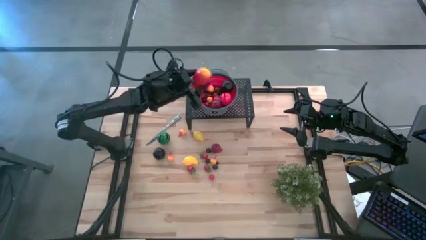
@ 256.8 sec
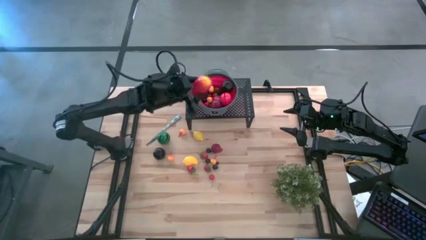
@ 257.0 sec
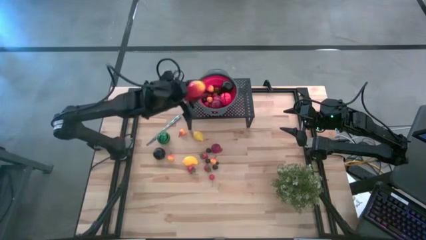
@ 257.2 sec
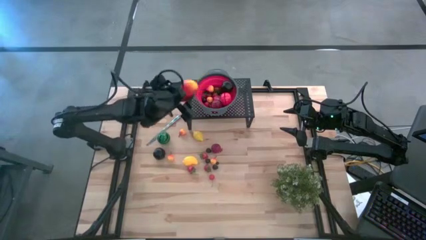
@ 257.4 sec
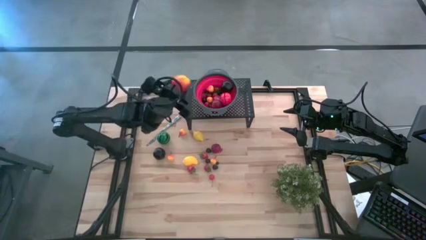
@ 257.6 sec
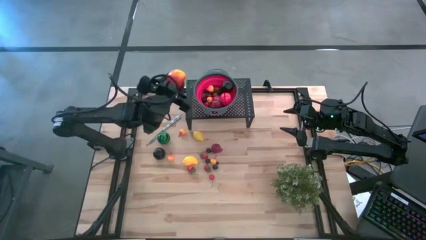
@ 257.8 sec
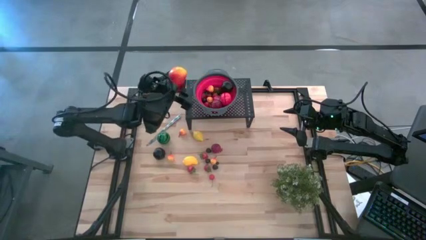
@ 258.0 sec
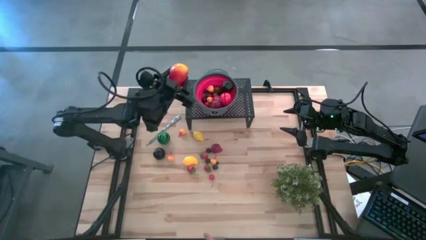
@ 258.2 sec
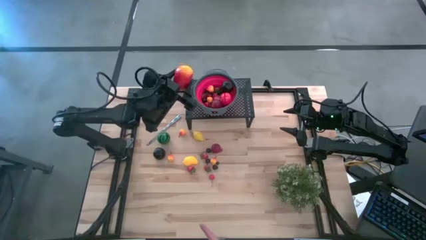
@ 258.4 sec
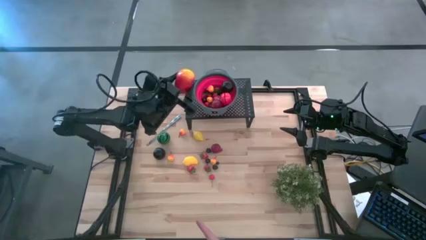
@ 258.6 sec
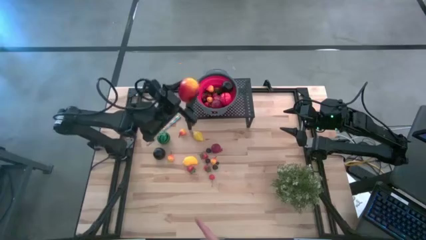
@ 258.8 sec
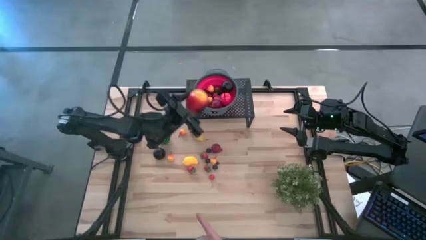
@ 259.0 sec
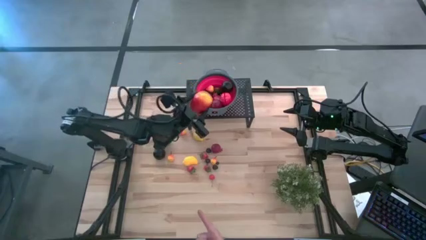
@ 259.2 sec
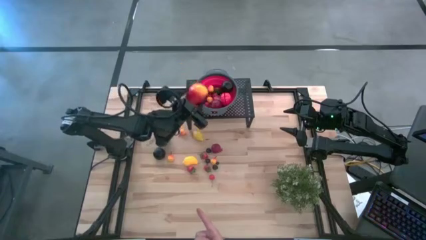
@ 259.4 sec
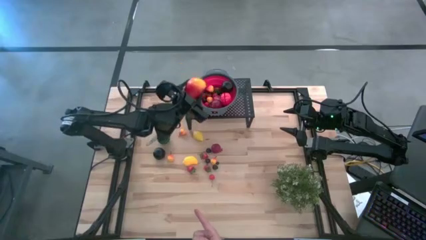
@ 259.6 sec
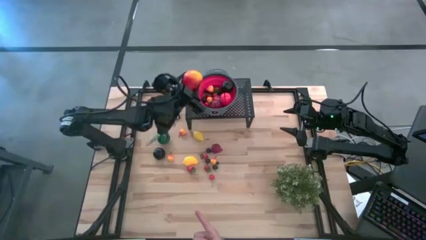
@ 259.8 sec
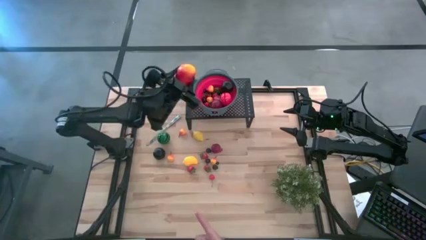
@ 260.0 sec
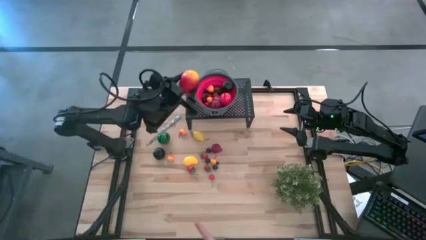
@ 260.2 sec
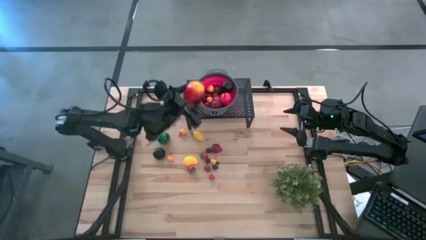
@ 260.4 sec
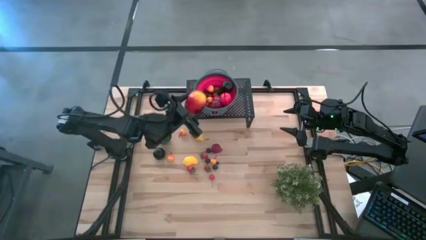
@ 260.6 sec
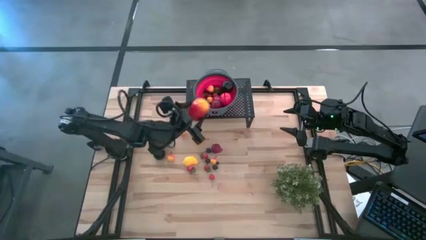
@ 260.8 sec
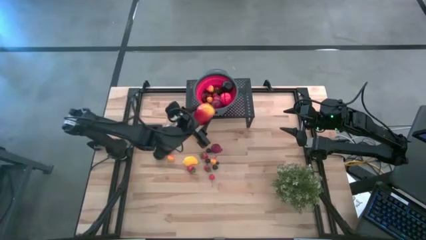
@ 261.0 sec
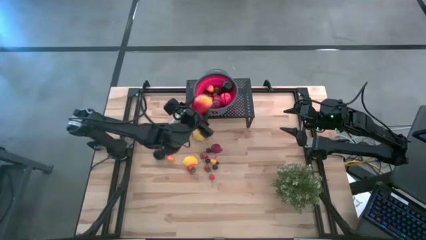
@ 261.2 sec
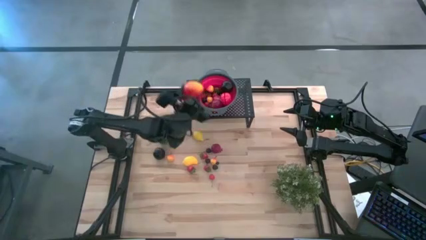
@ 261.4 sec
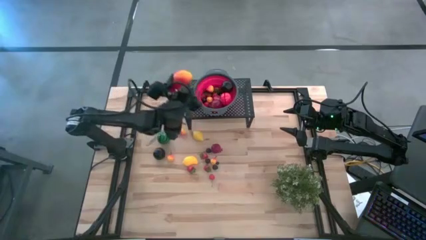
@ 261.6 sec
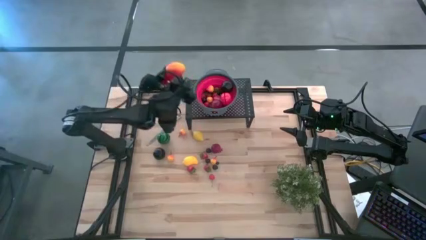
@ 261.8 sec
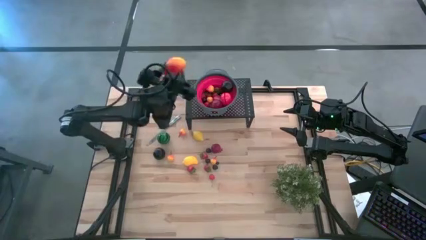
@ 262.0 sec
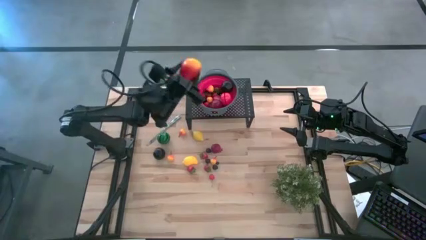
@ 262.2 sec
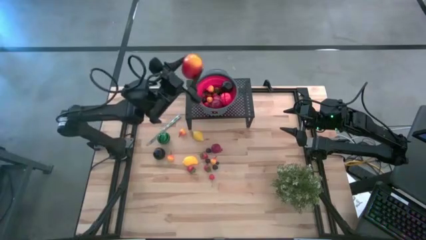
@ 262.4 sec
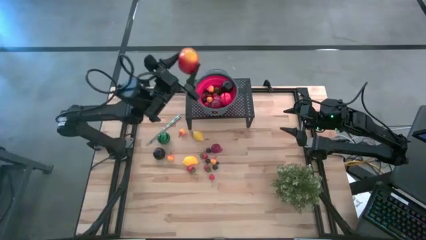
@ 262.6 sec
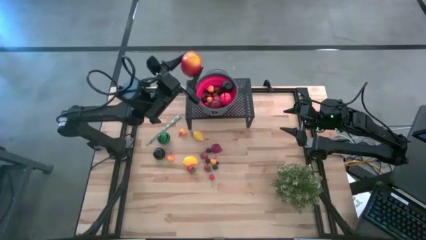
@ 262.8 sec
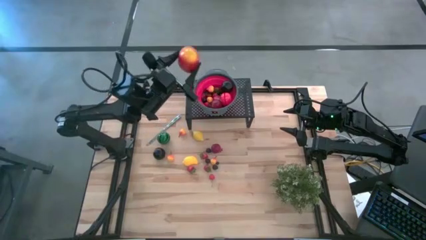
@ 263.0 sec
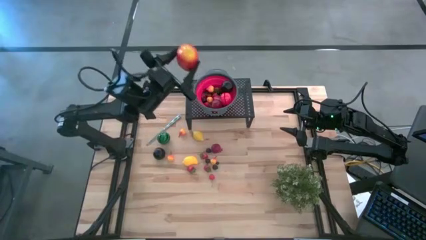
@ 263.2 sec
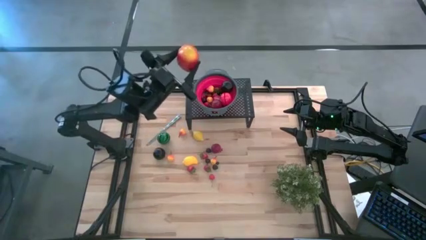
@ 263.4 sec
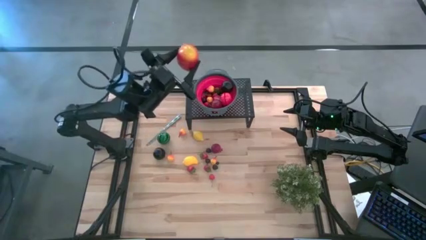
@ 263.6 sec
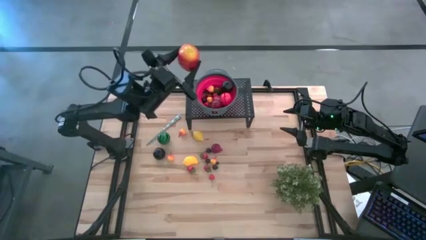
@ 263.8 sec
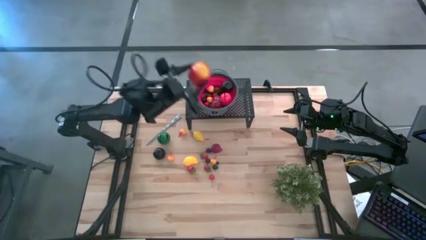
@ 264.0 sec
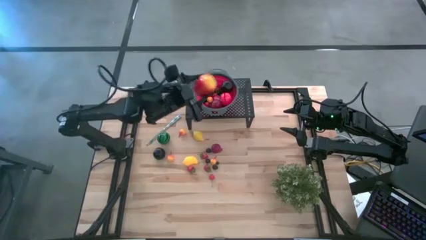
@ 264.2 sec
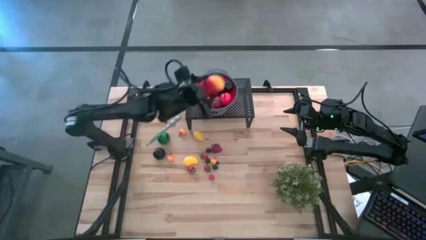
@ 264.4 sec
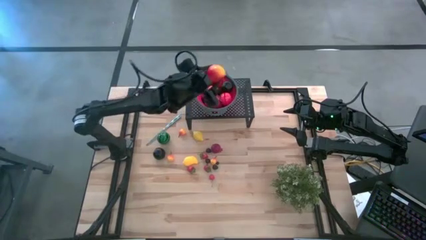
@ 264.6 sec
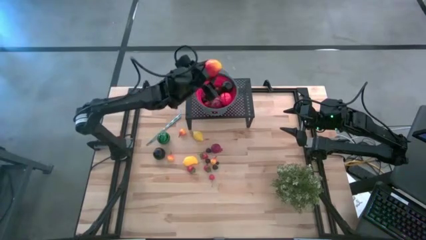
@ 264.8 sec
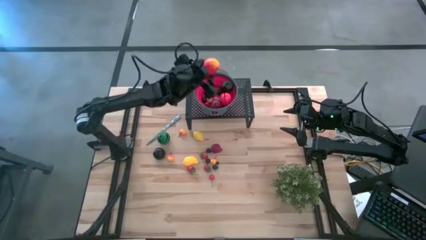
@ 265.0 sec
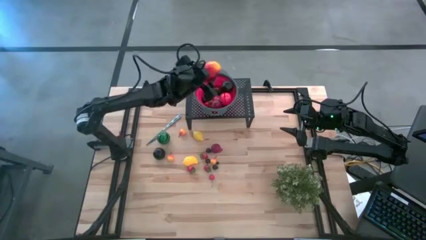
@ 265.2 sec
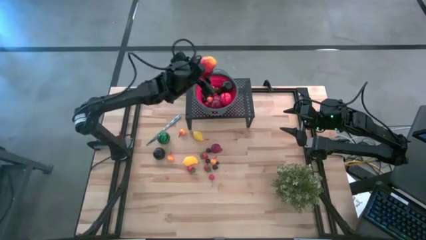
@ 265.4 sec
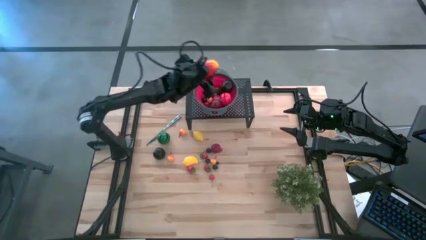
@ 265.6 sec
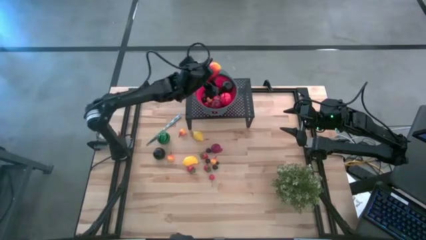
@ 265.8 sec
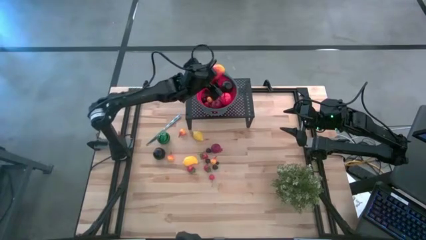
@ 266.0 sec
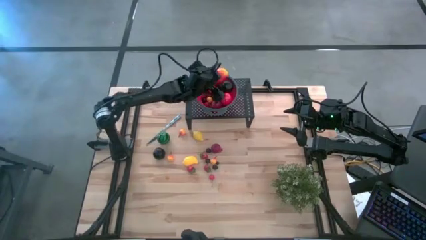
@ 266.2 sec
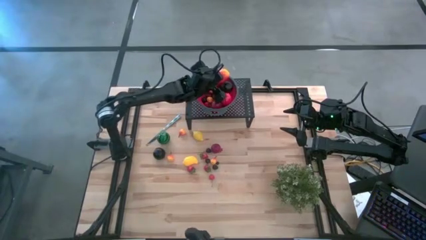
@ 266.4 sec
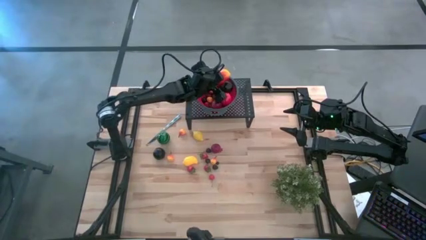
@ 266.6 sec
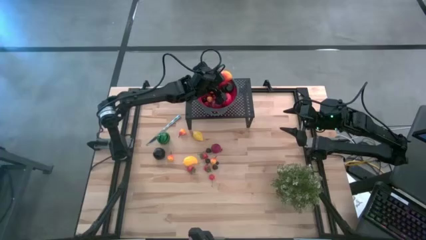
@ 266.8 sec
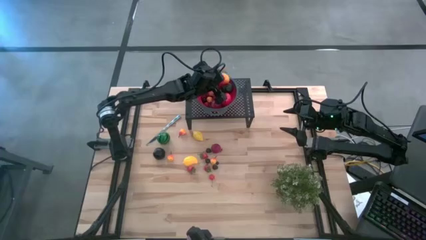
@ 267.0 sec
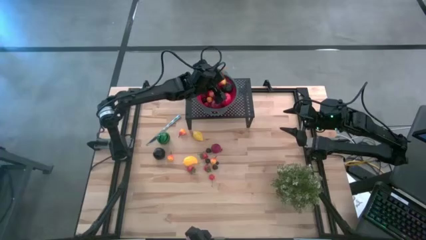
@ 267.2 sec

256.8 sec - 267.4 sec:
Task: Pick & Place Fruit
Put the mango in the red colander on the shelf

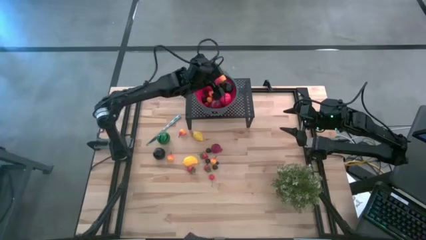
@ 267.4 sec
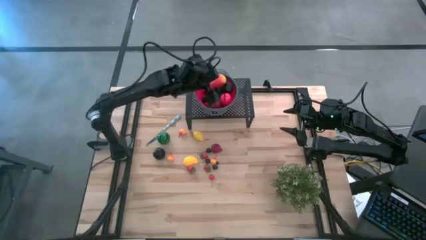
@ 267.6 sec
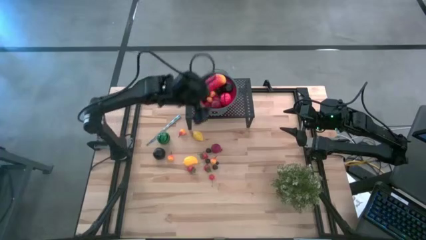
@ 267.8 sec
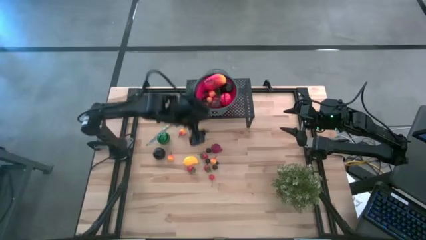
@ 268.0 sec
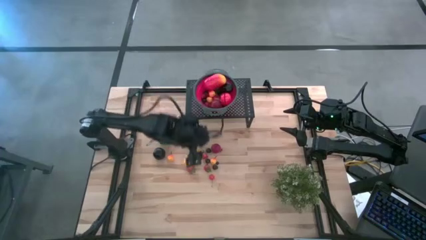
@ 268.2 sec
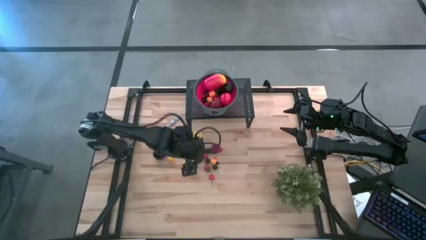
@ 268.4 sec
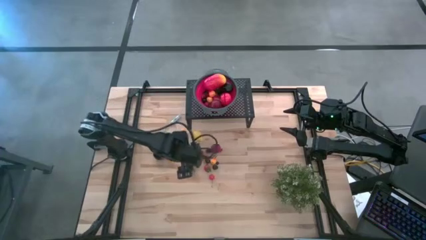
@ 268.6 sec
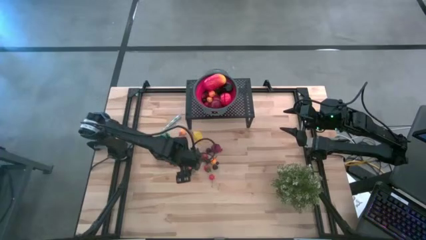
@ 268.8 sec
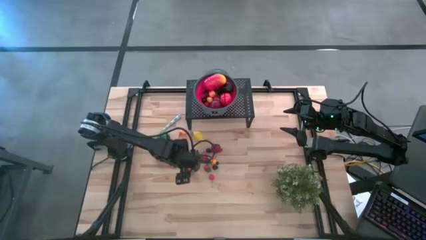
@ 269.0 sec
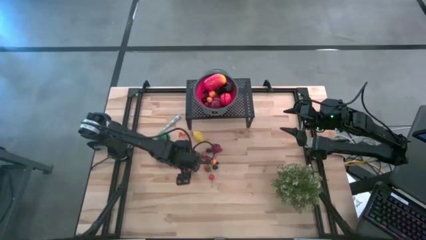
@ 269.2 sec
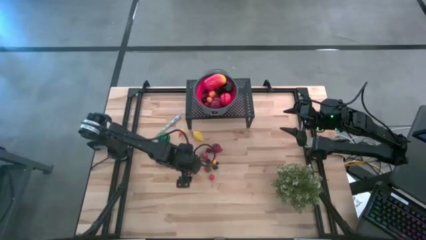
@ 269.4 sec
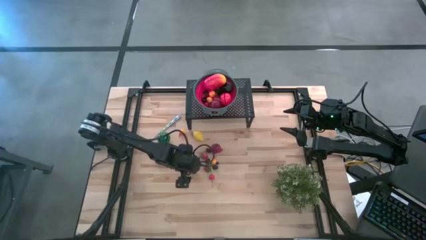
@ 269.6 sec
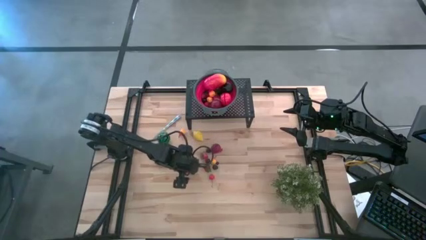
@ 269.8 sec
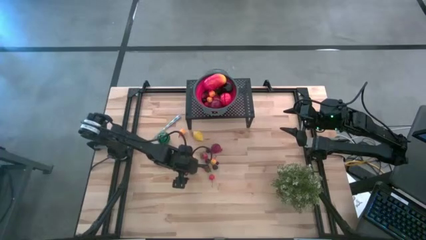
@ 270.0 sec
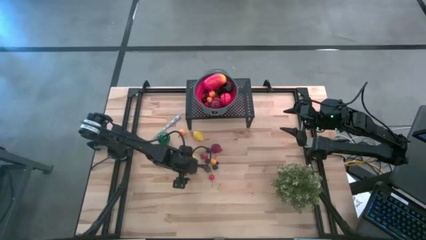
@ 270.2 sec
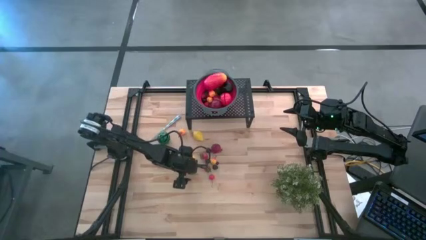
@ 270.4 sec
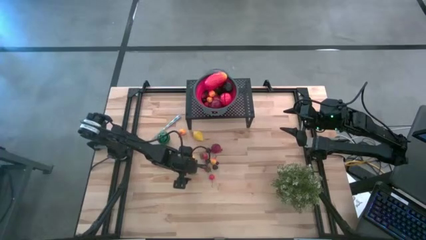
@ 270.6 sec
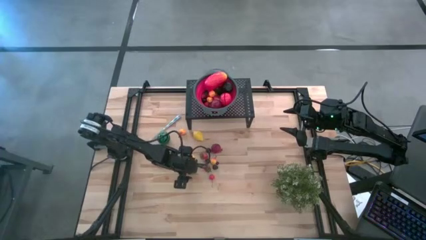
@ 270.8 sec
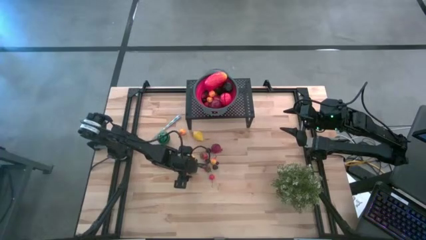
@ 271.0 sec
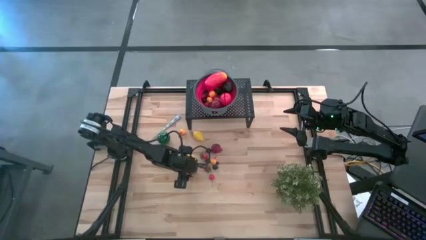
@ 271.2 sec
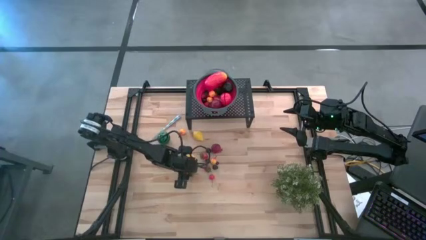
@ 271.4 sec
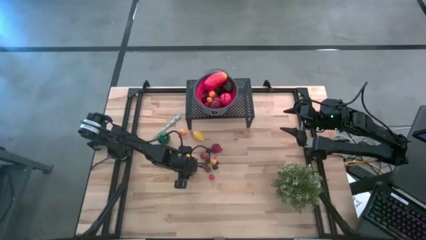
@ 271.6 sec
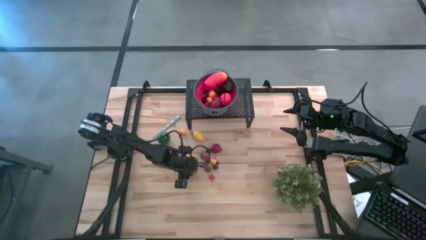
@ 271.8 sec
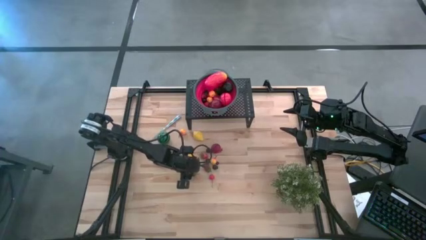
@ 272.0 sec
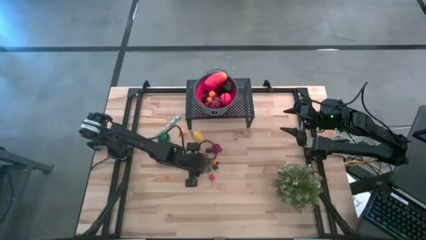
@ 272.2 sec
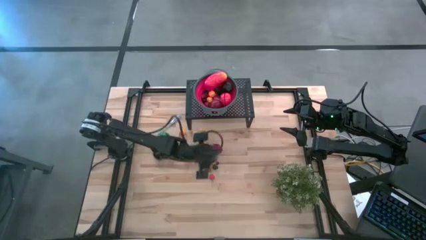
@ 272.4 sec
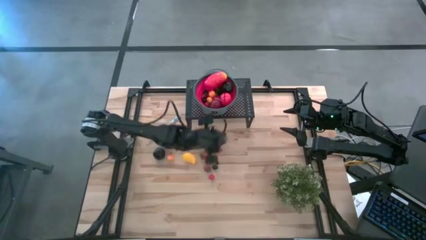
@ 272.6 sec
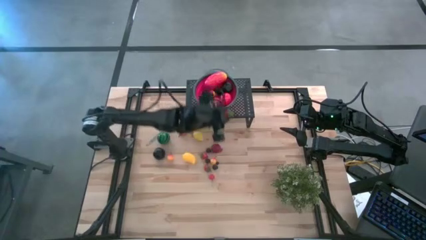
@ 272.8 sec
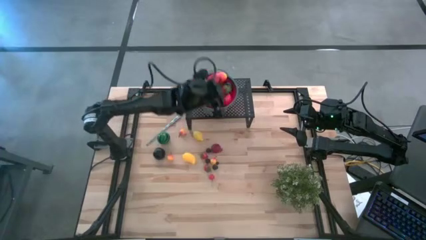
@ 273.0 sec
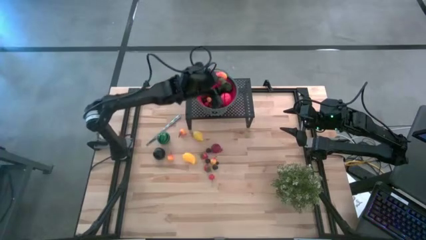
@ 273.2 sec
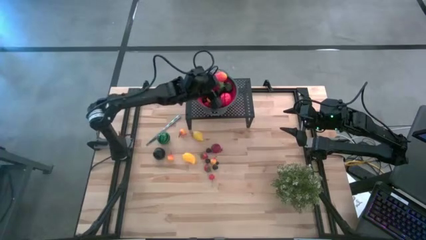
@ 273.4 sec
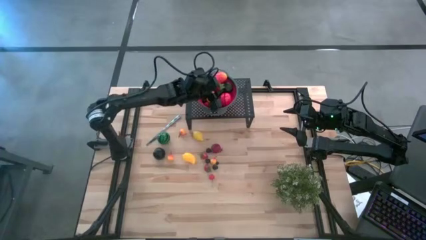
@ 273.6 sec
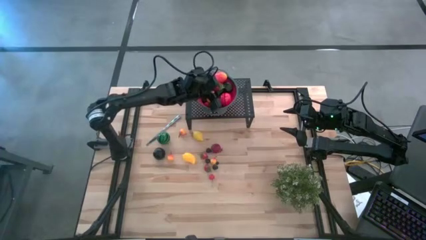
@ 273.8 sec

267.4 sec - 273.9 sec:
Put the strawberry in the red colander on the shelf
